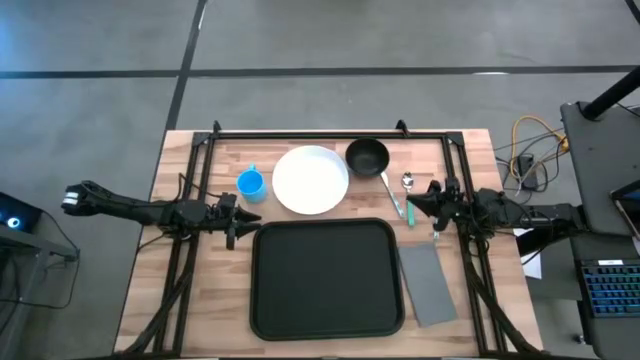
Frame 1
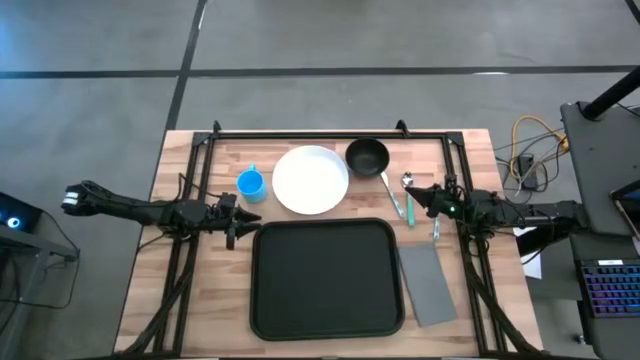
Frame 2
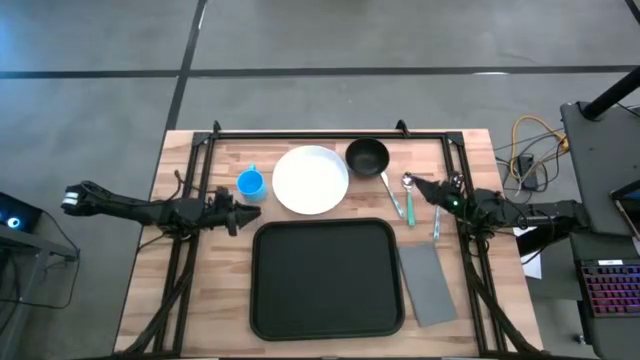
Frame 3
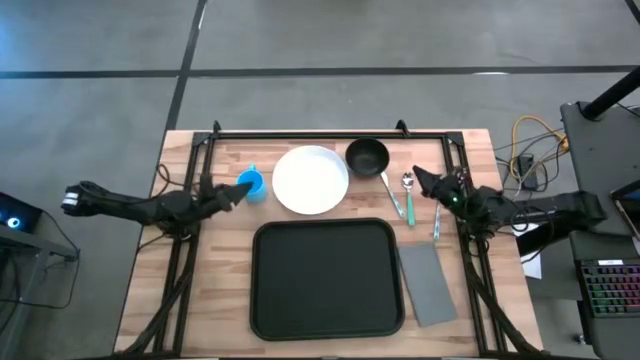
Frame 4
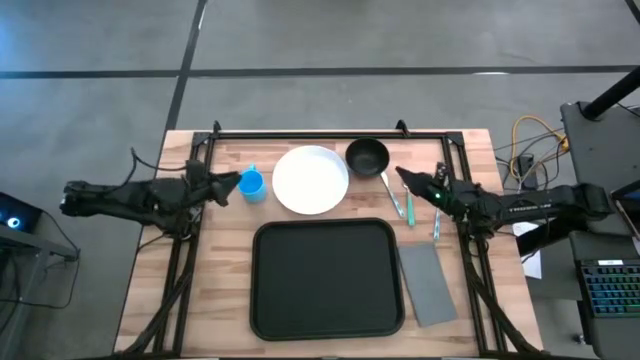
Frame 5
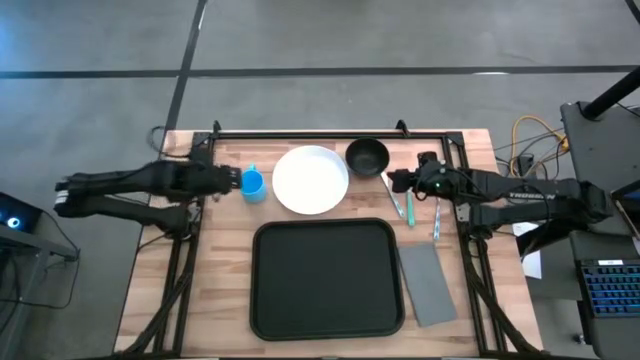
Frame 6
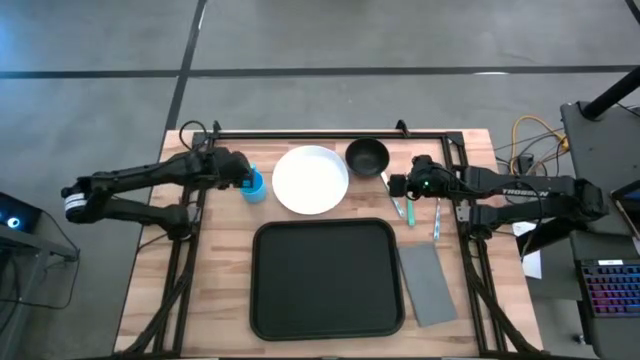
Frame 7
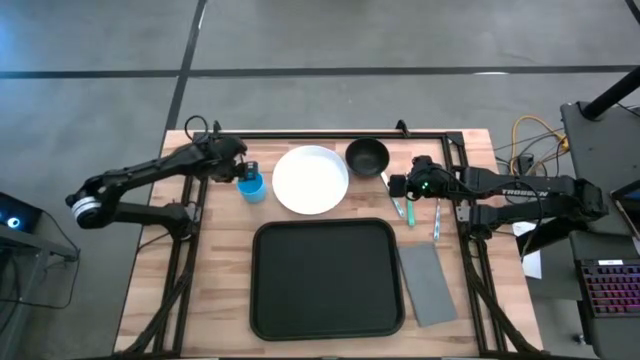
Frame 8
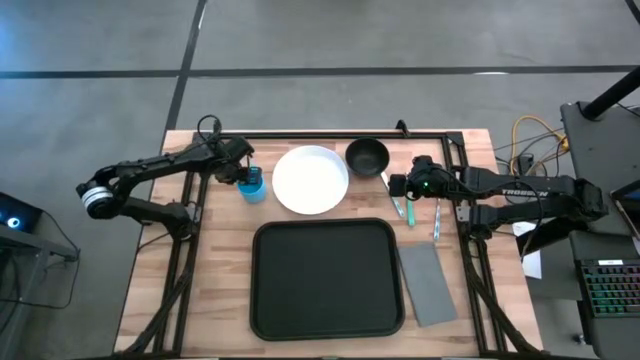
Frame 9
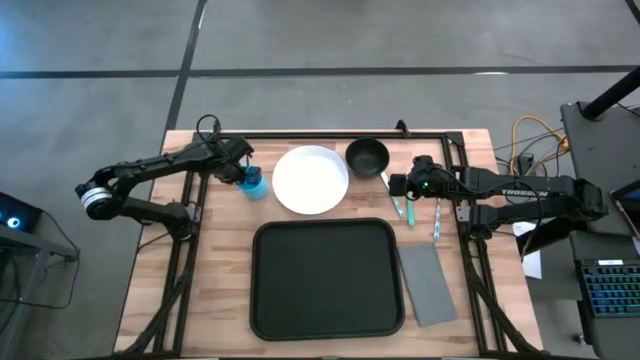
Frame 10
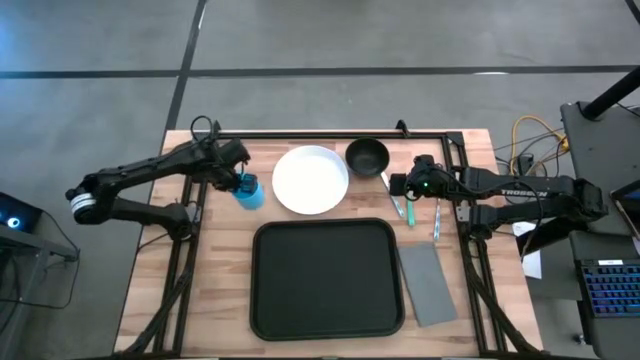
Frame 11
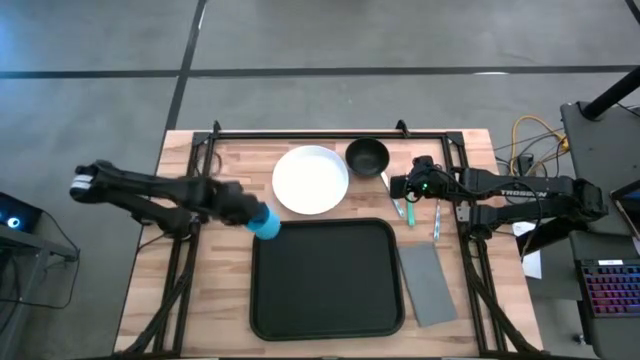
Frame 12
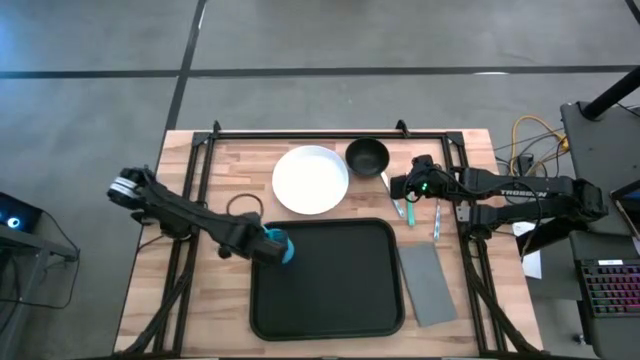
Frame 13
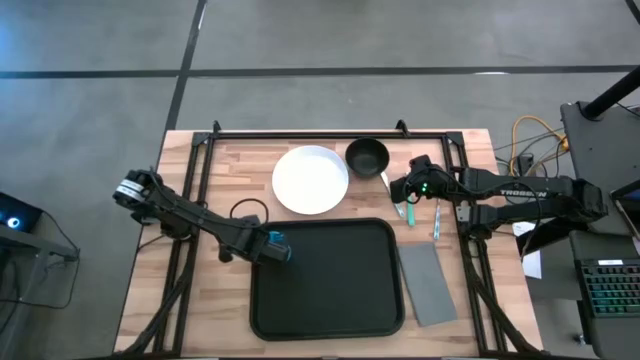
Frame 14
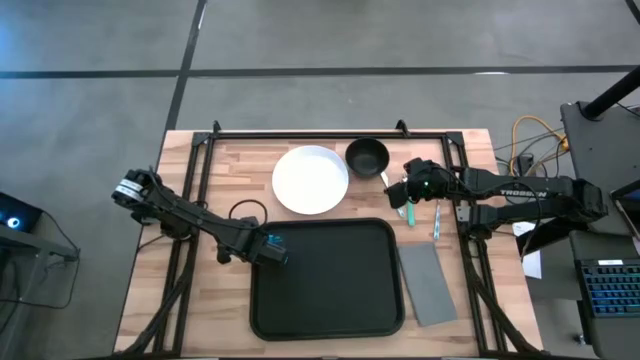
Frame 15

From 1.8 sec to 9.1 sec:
Task: Set up tray
Put the mug on top of the tray

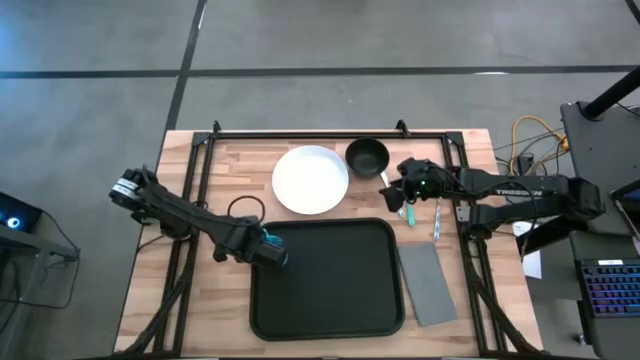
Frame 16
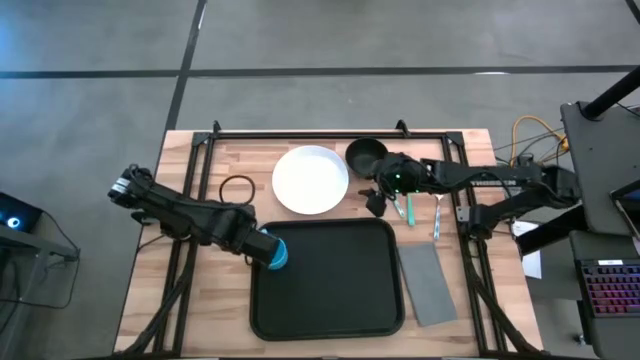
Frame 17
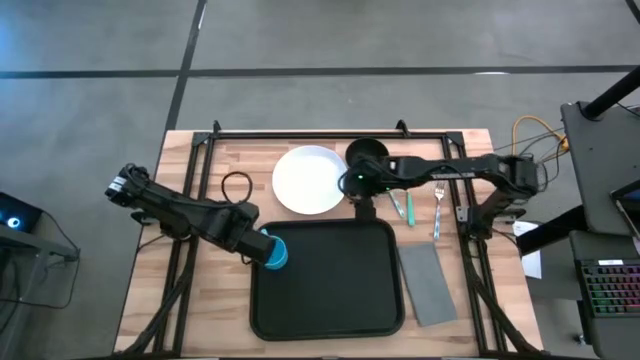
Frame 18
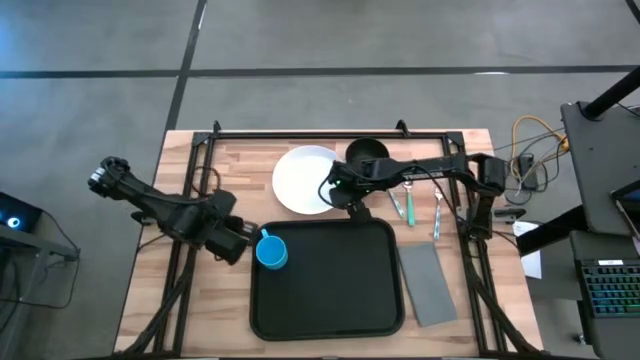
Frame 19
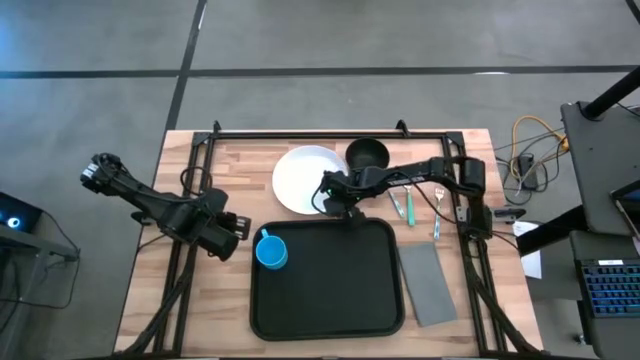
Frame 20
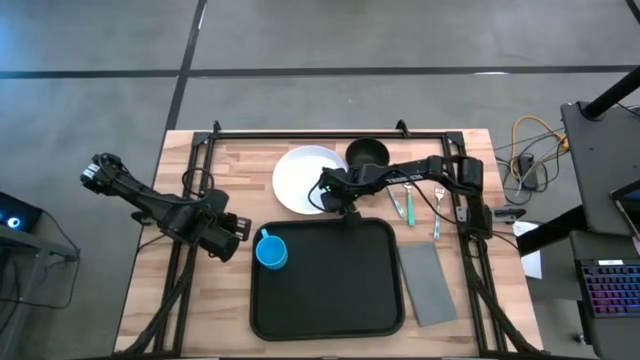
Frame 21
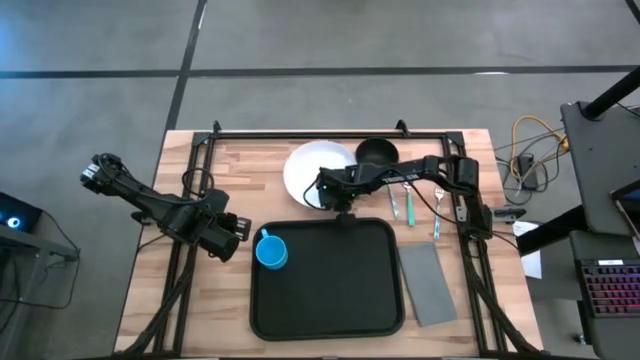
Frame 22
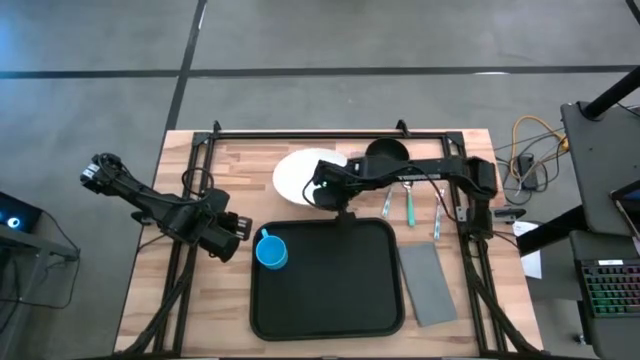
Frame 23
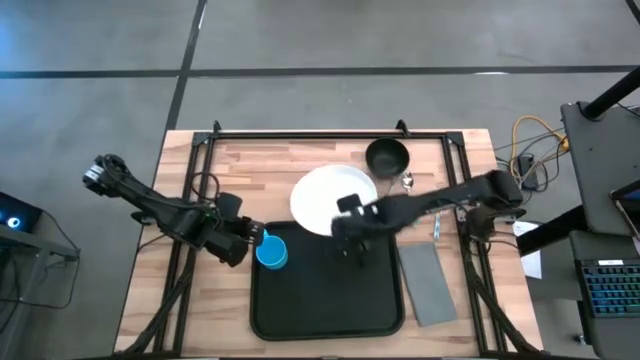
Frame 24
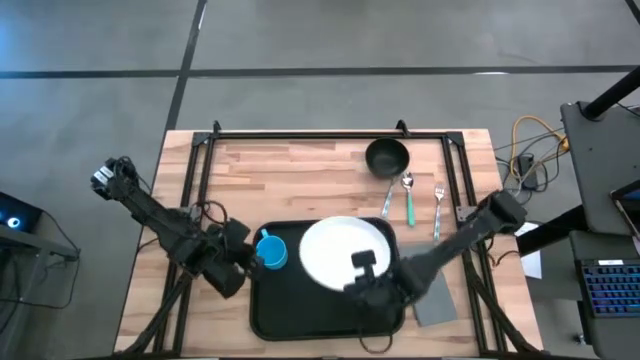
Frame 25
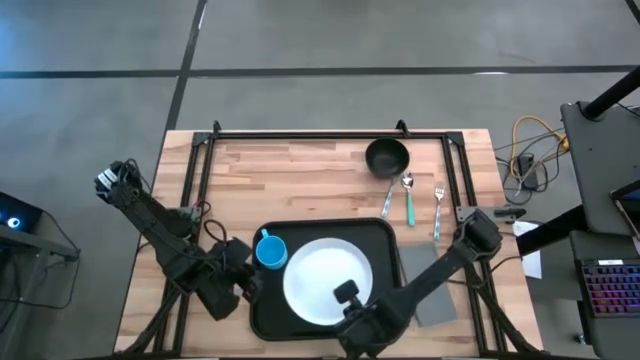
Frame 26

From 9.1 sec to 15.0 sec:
Put the plate on top of the tray

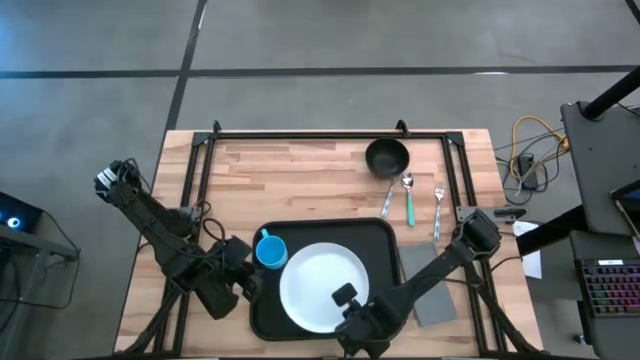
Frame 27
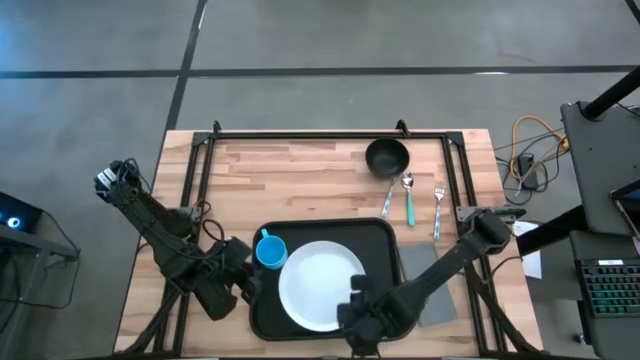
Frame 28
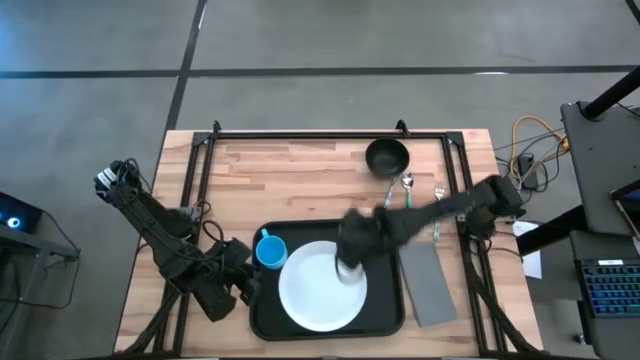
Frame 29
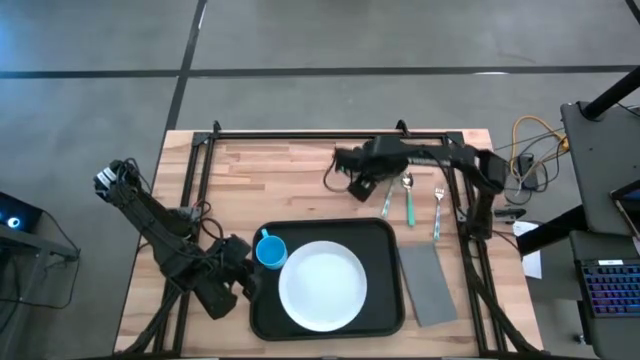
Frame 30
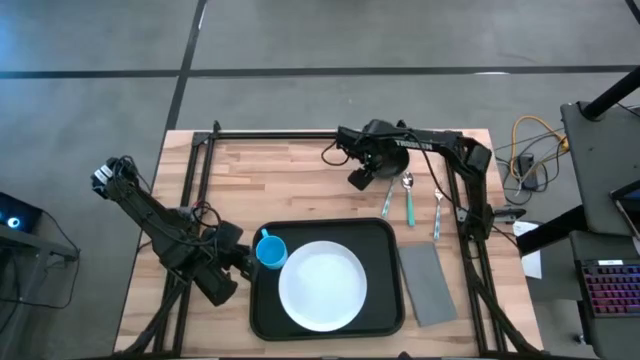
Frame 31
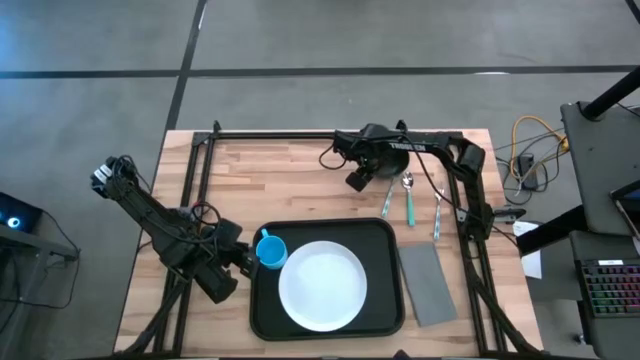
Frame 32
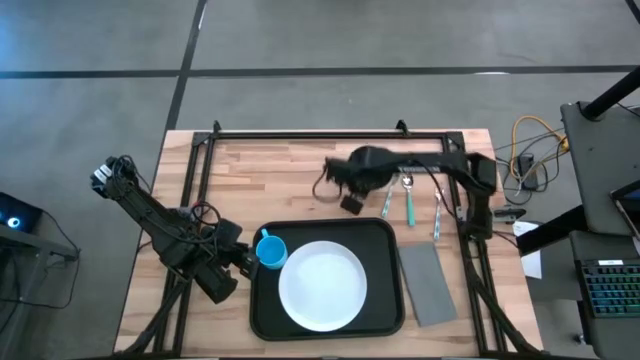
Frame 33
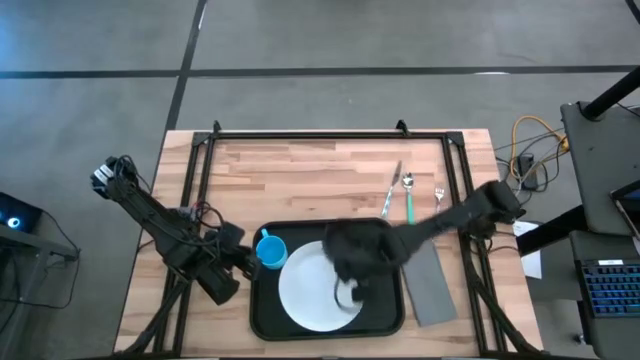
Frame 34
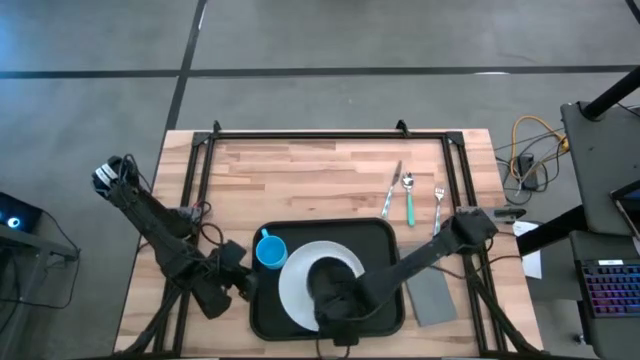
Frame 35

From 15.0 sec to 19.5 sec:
Put the bowl on top of the tray

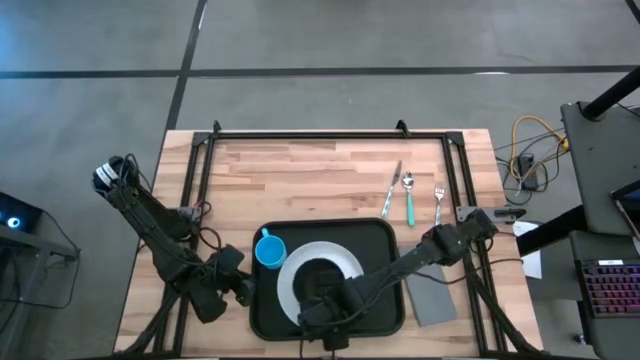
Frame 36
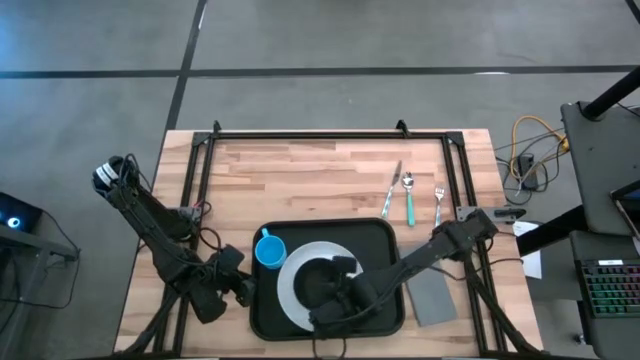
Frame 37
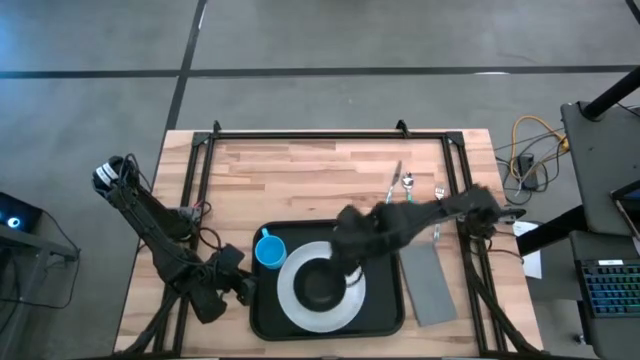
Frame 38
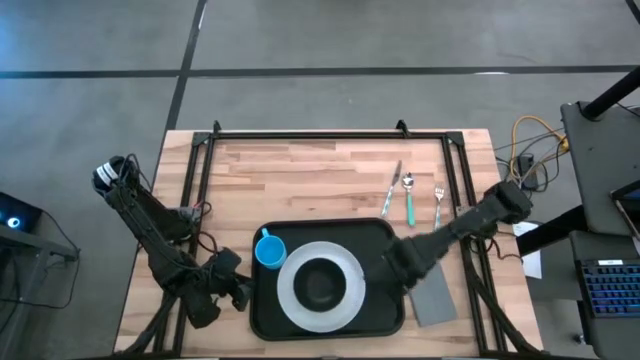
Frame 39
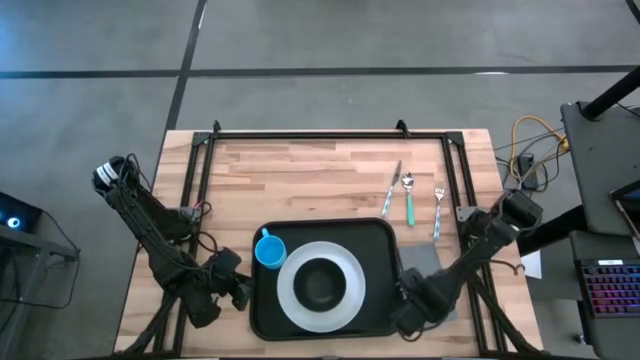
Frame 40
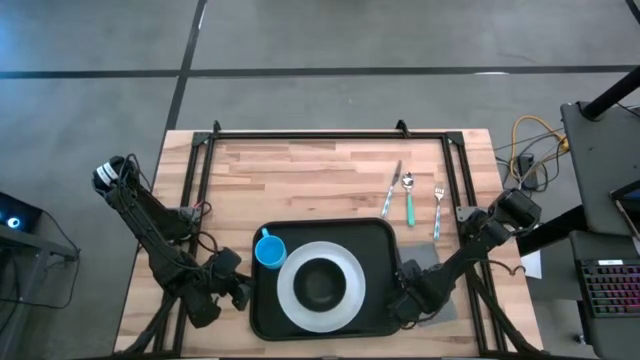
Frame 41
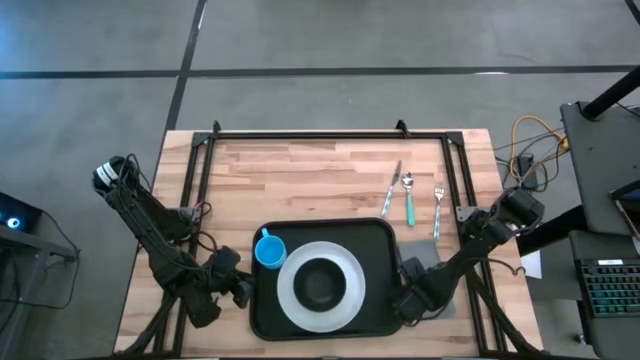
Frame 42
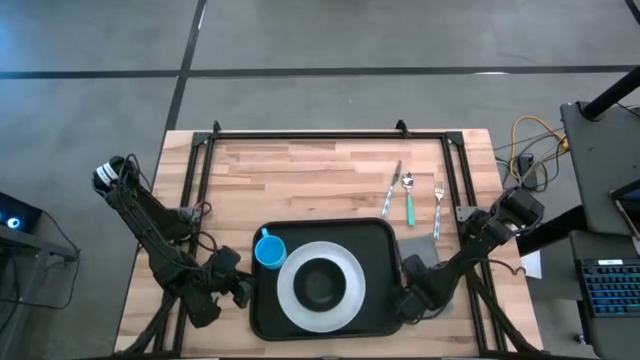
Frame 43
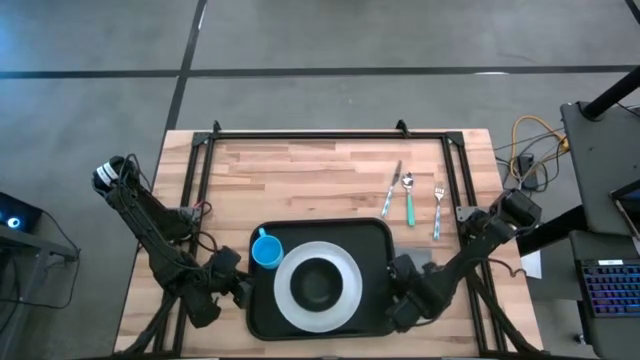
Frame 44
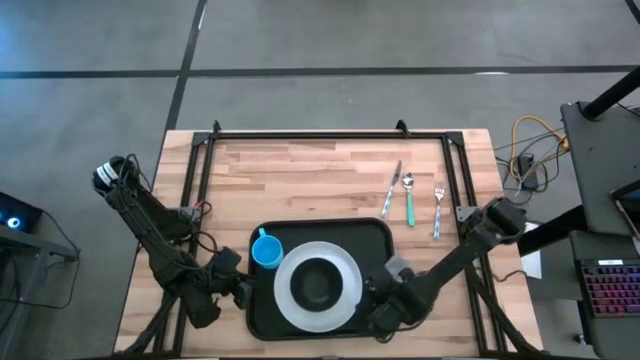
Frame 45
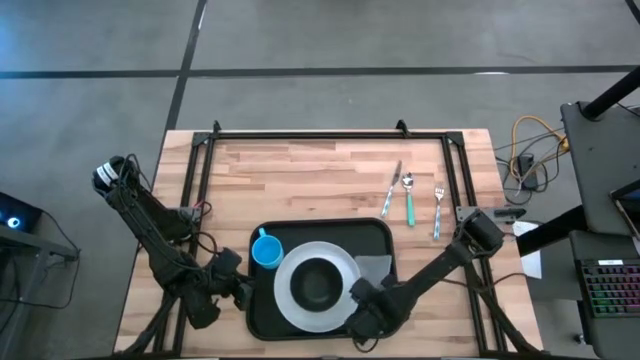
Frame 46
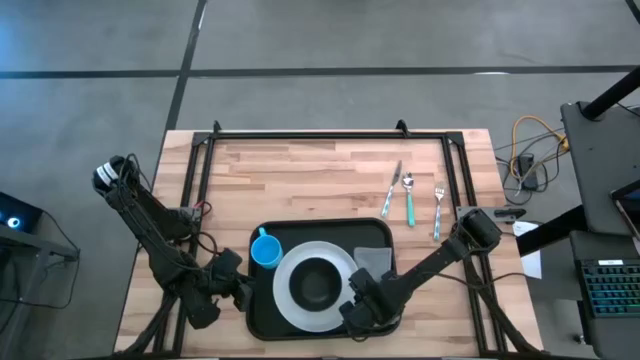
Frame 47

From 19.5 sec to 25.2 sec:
Put the napkin on top of the tray
